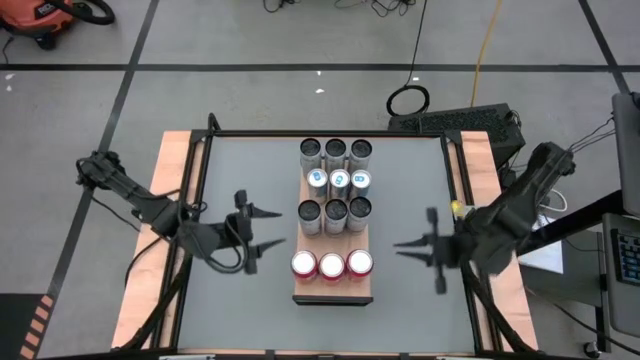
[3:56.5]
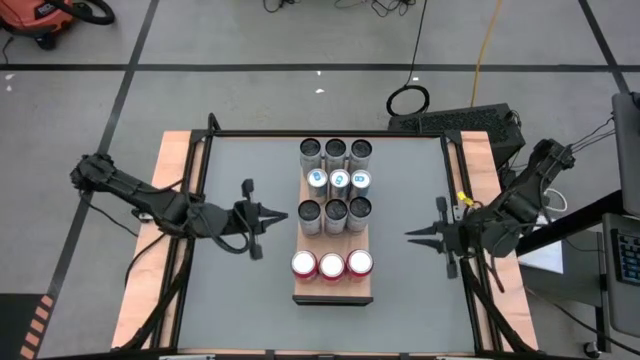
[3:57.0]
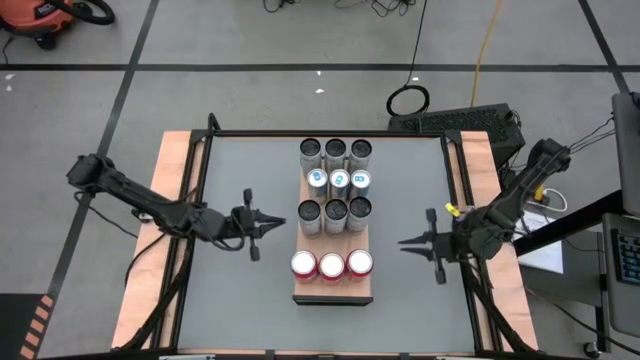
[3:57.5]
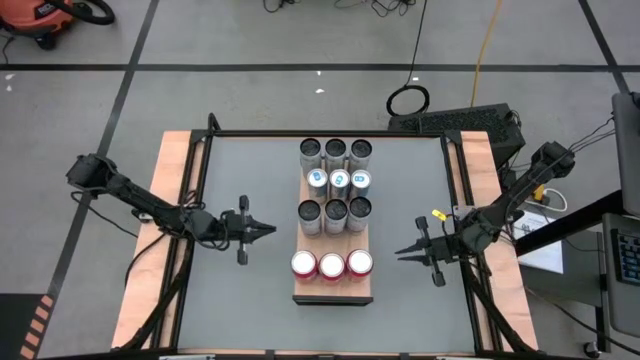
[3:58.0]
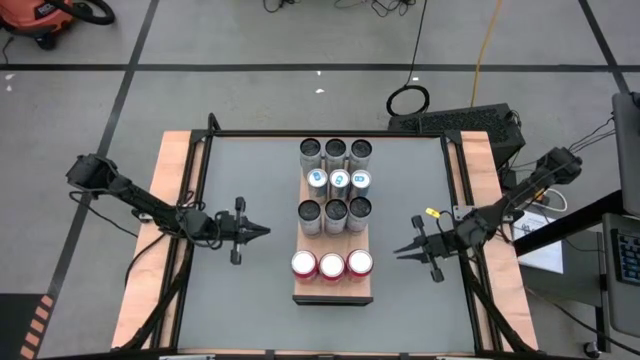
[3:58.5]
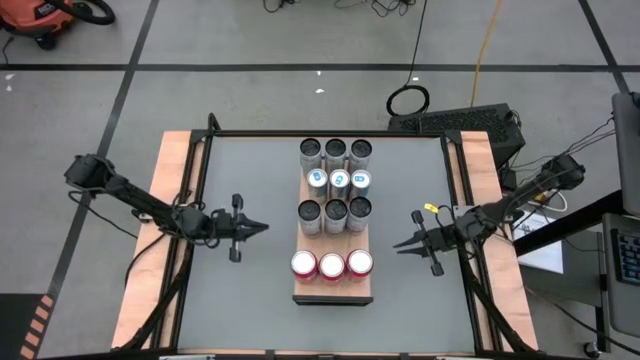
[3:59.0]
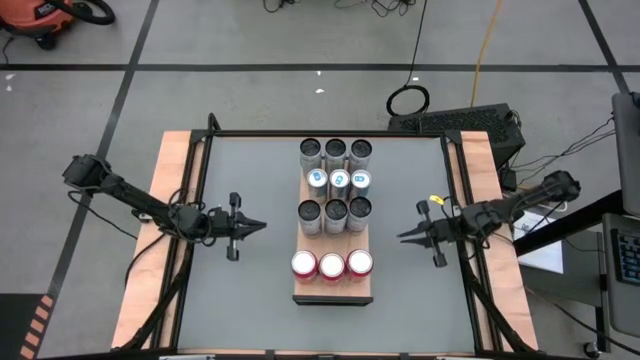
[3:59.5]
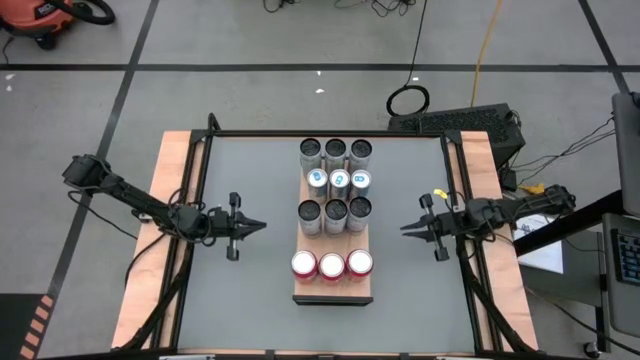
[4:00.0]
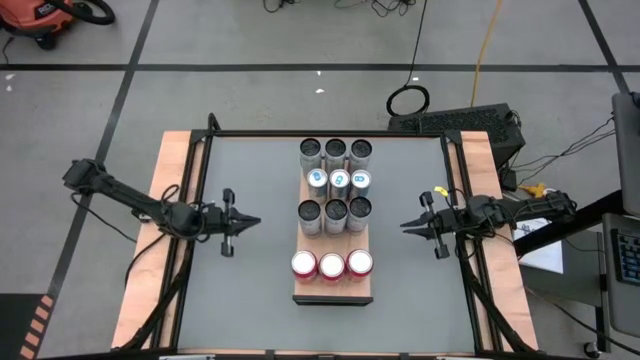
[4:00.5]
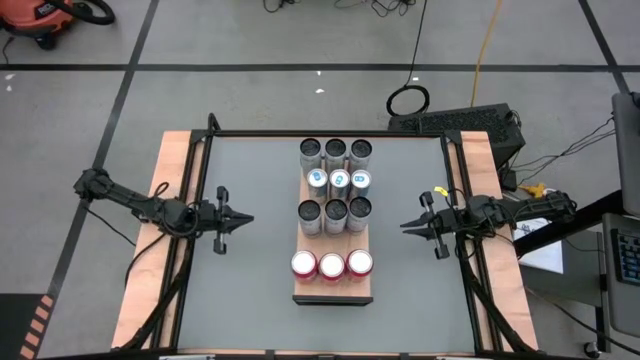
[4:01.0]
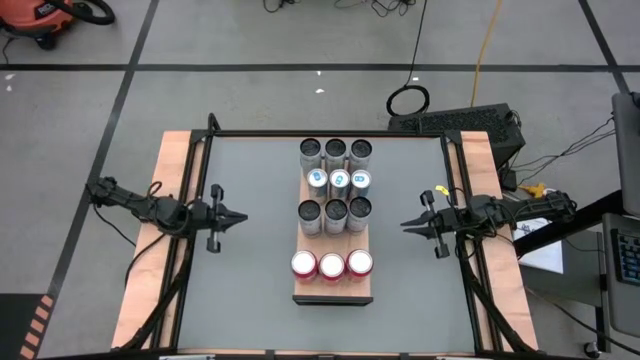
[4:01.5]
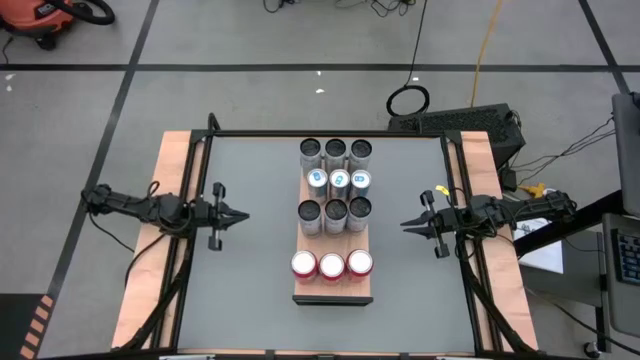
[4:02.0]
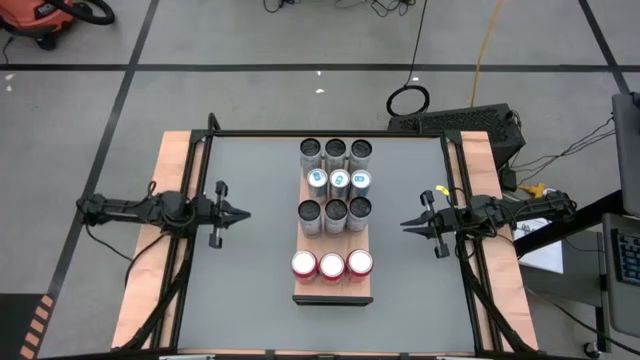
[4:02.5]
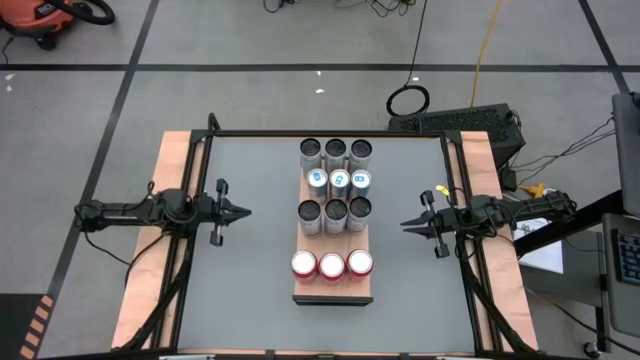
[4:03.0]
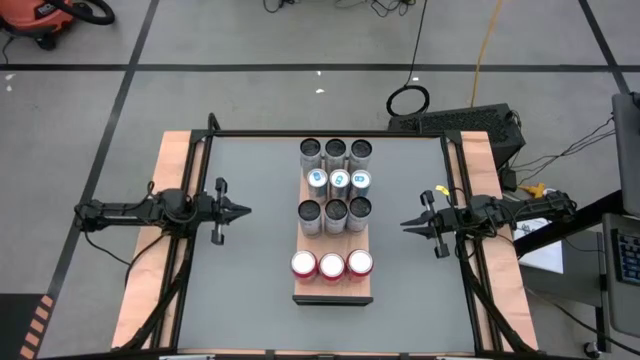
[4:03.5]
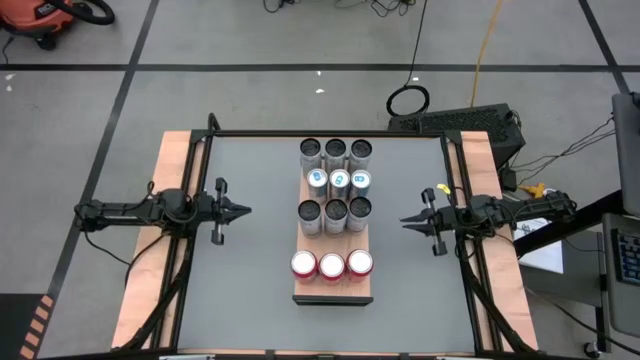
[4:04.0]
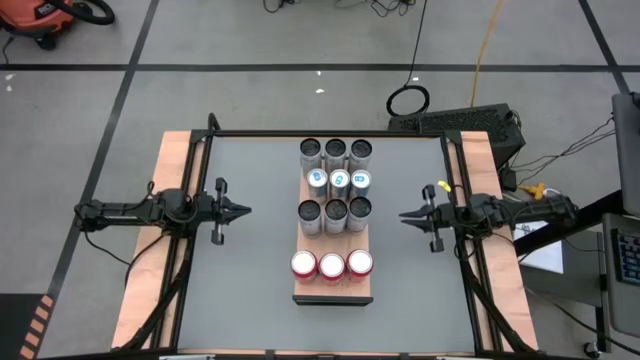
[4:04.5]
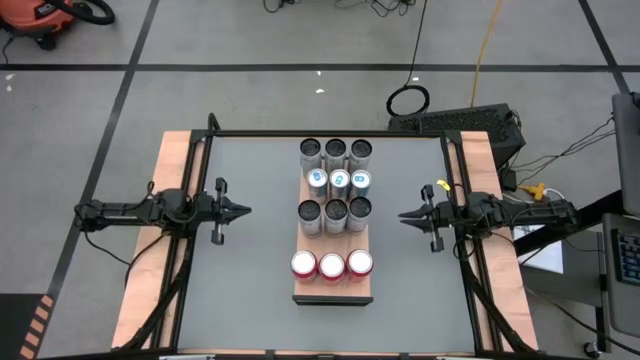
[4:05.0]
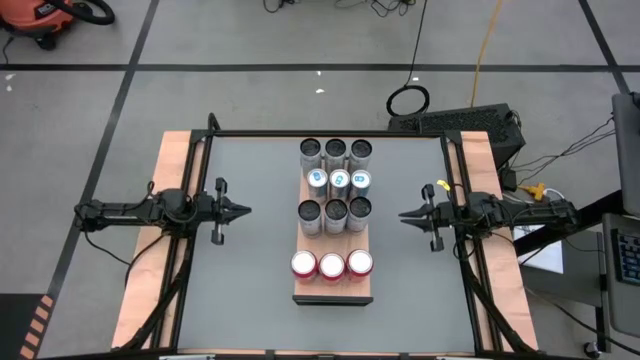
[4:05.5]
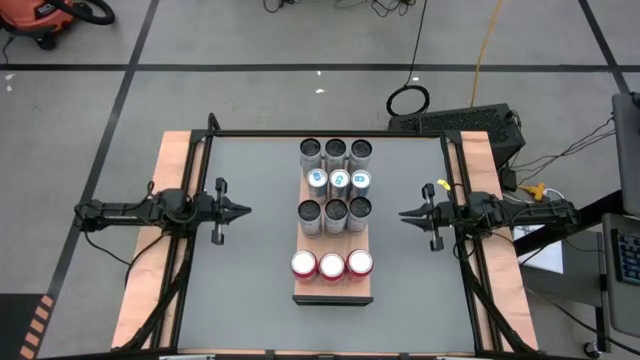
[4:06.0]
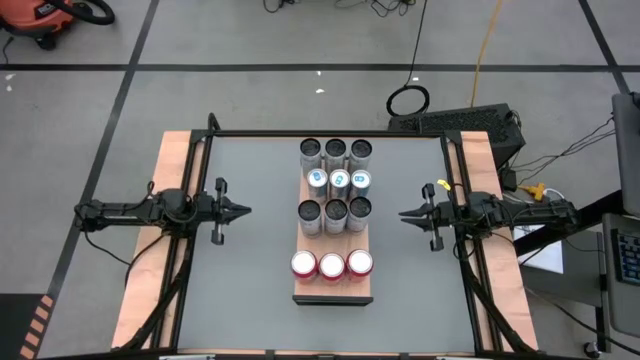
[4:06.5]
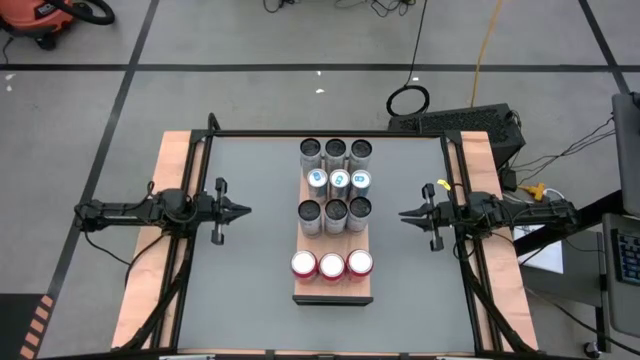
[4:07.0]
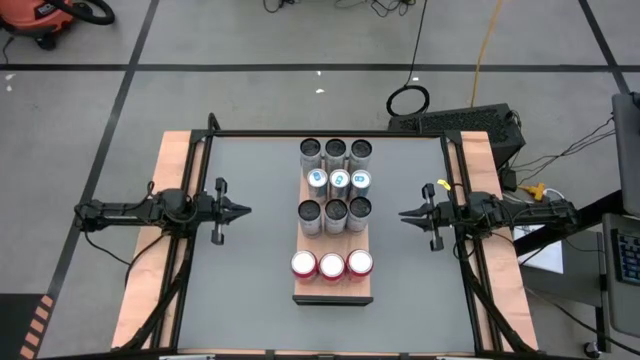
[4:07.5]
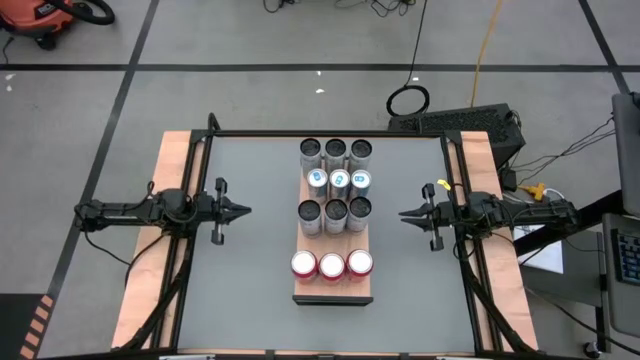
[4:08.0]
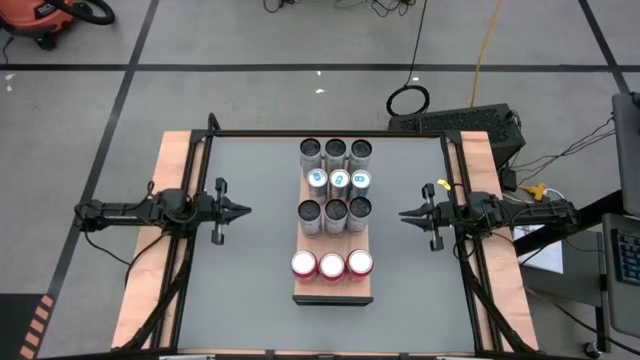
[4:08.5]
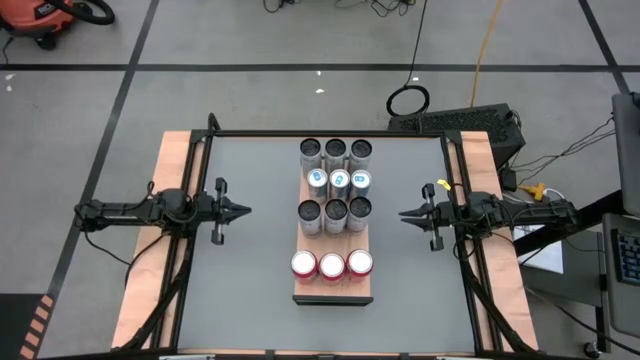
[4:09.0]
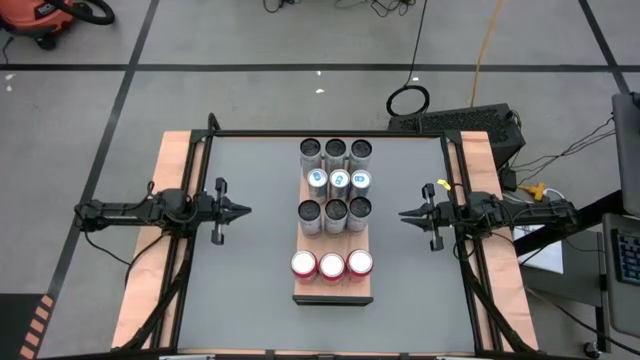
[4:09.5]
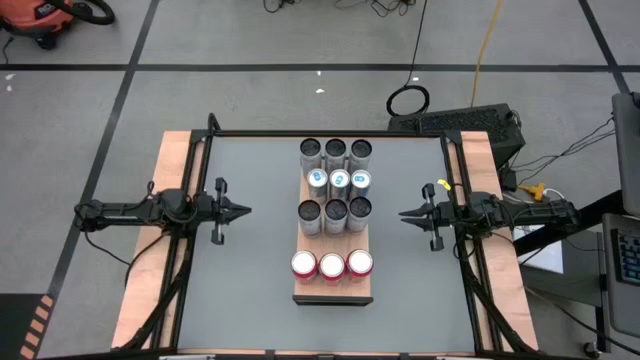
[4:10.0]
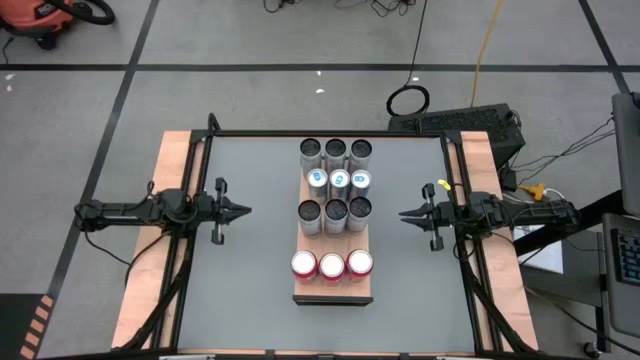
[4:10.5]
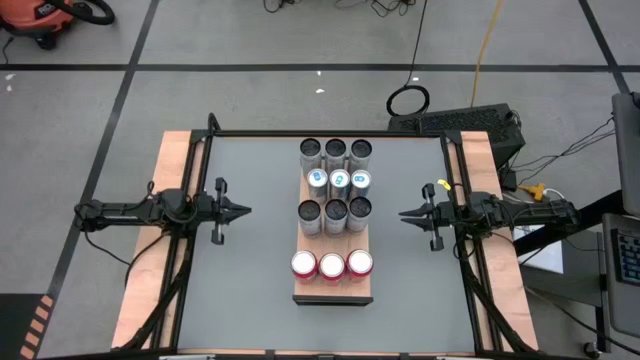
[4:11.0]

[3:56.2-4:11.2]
Task: Place canned beverage on shelf
Return to Home Position

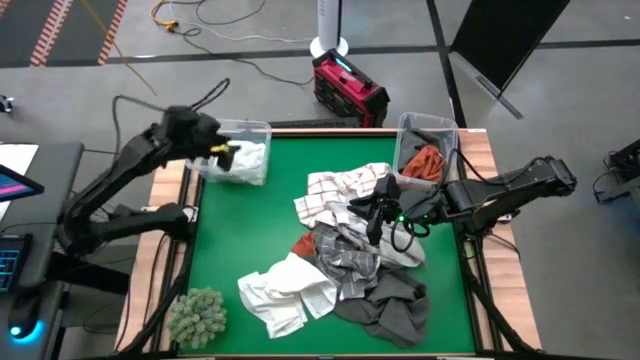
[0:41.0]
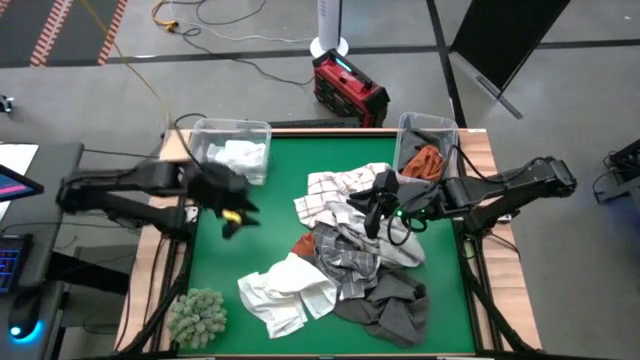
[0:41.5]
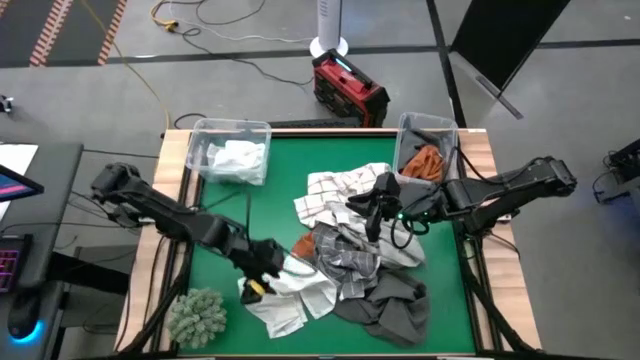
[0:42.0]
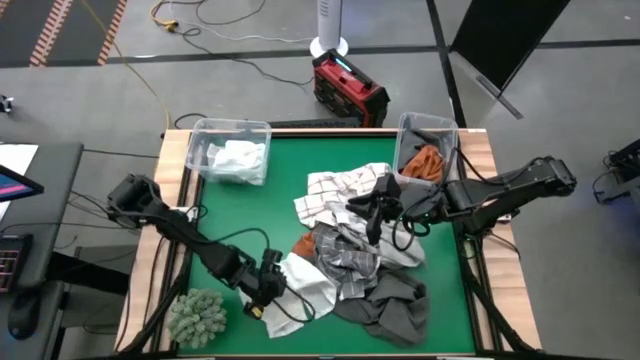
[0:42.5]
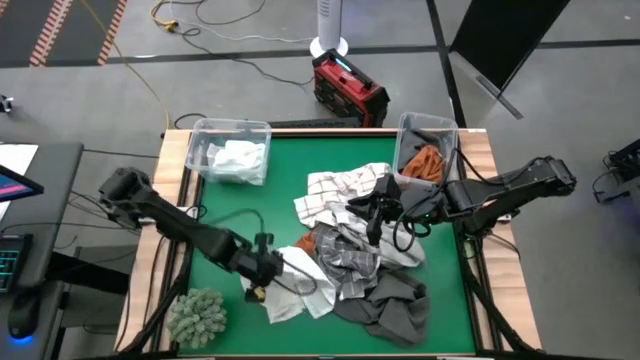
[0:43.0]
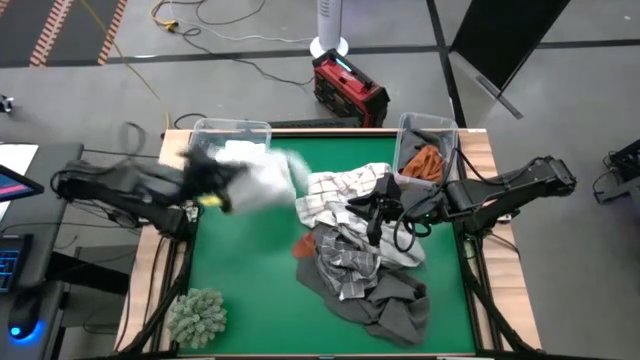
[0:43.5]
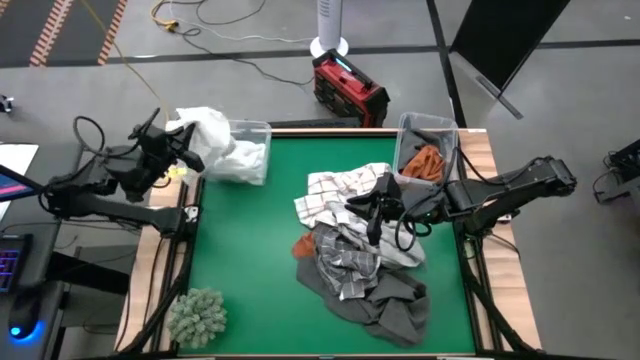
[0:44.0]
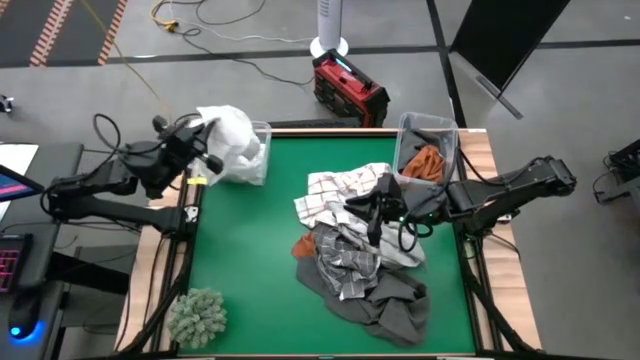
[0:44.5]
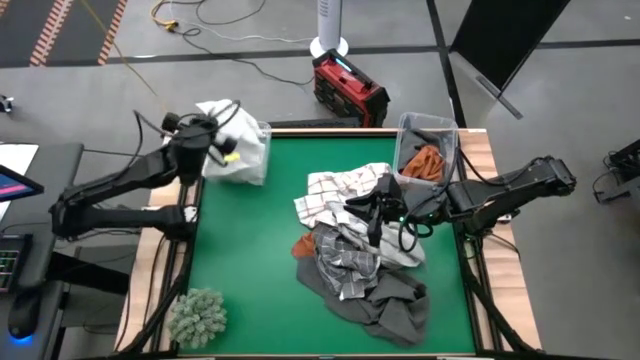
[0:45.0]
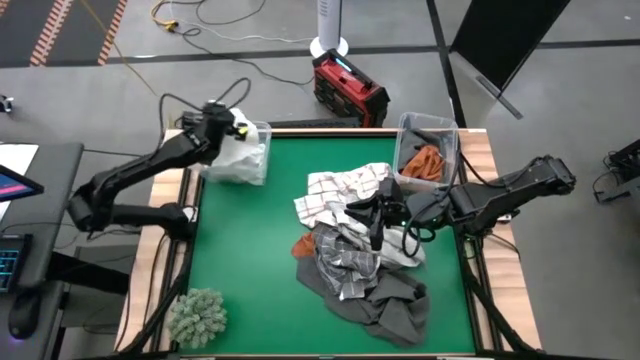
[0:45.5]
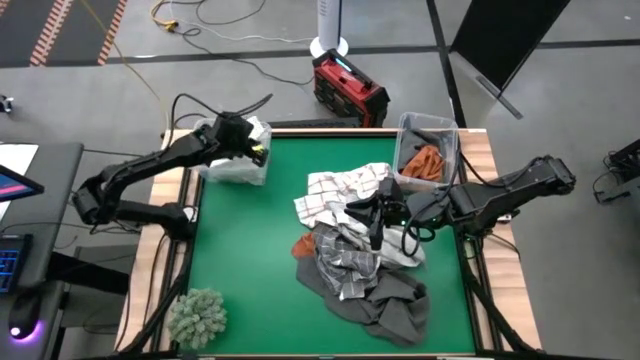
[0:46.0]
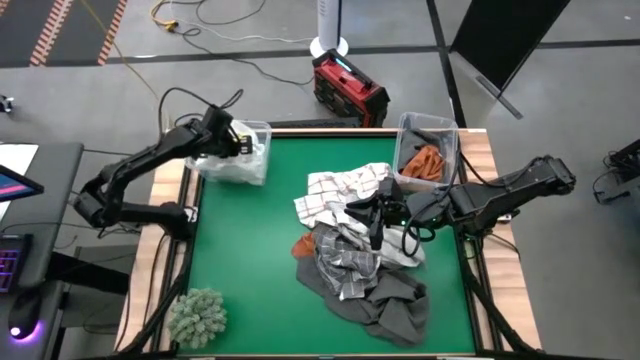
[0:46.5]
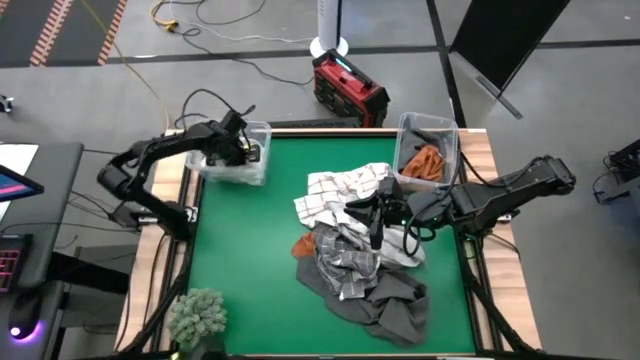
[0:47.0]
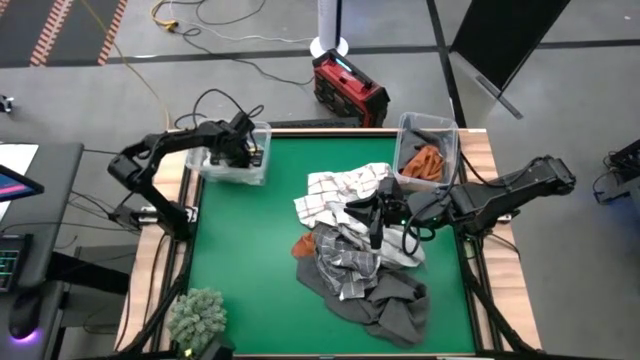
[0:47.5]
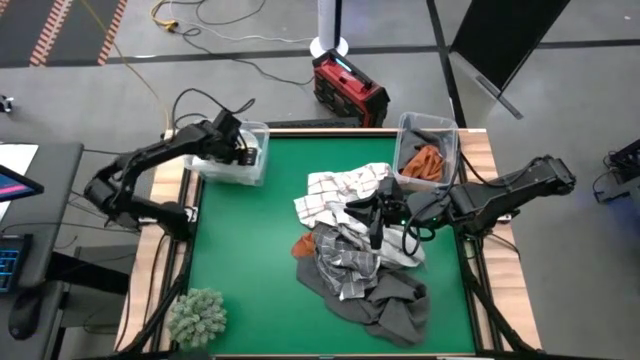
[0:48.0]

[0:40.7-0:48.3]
Task: Sort towels by color in basket
Put the white towel into the left transparent bin
